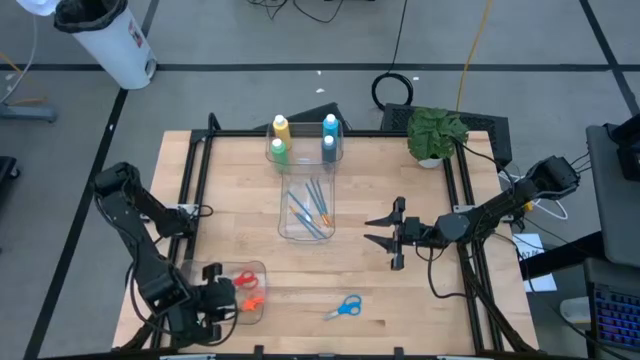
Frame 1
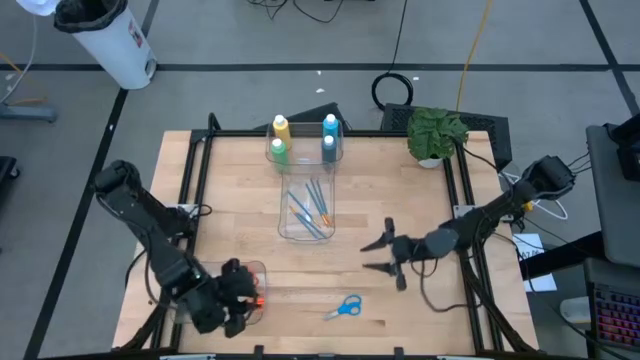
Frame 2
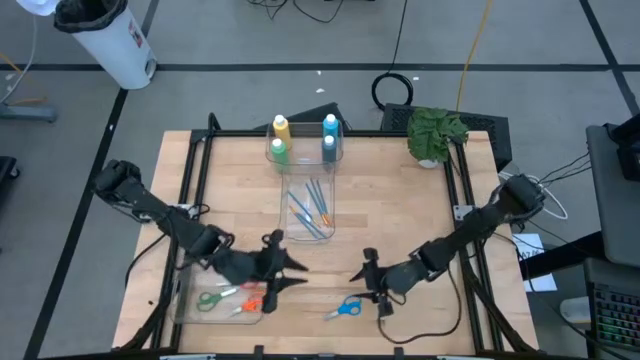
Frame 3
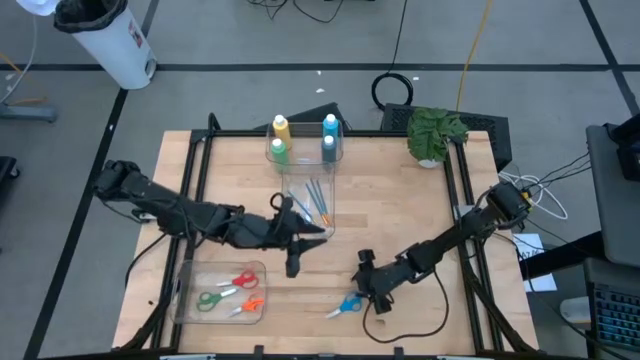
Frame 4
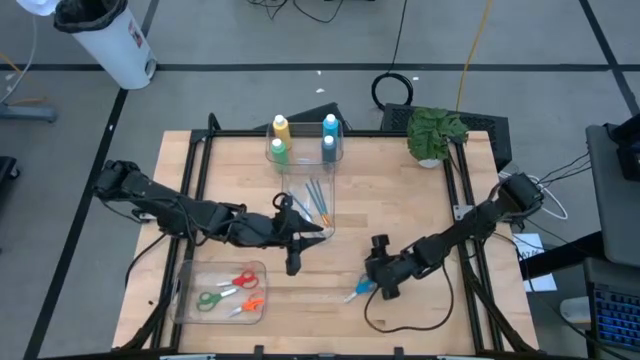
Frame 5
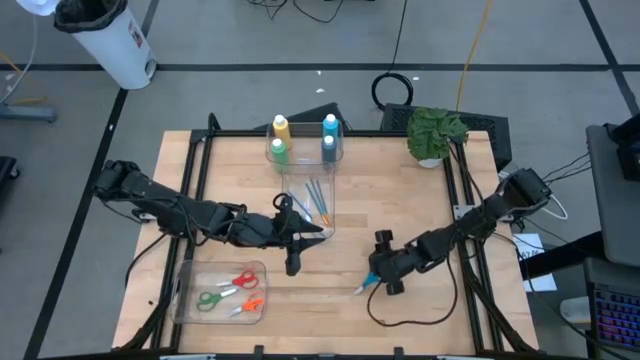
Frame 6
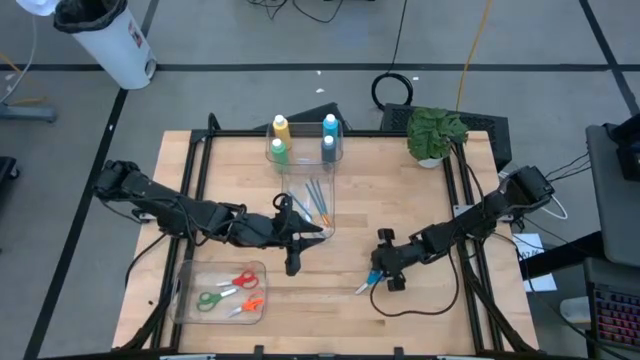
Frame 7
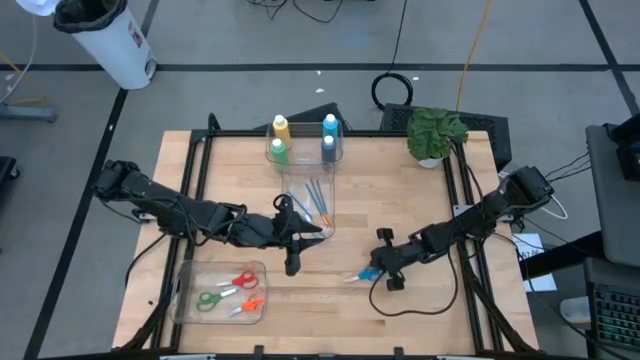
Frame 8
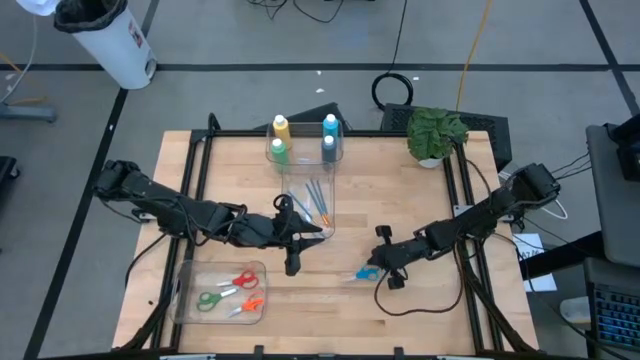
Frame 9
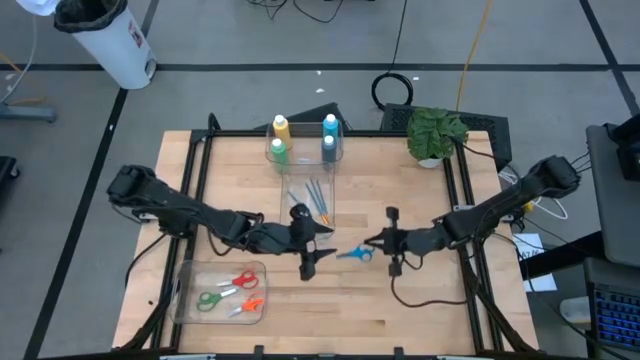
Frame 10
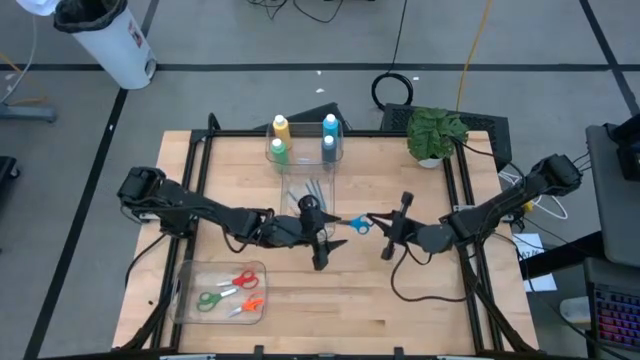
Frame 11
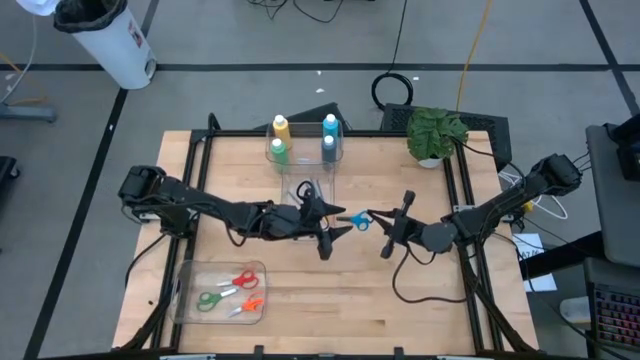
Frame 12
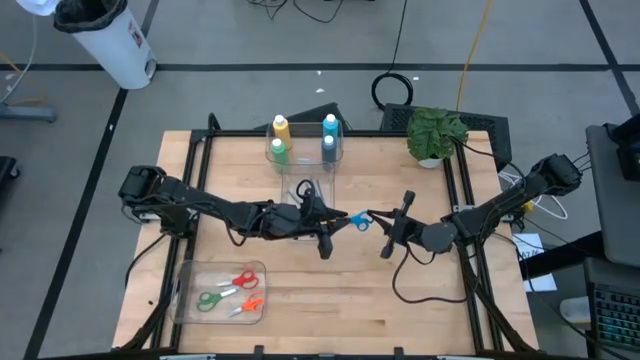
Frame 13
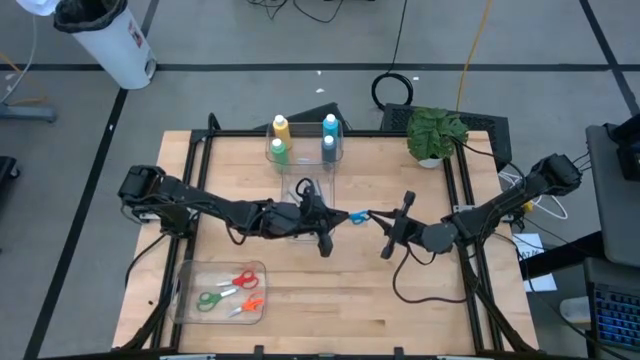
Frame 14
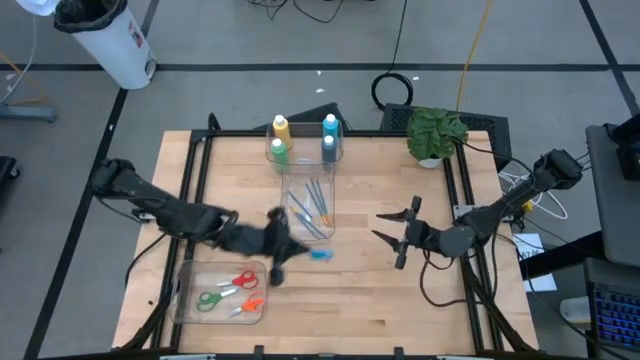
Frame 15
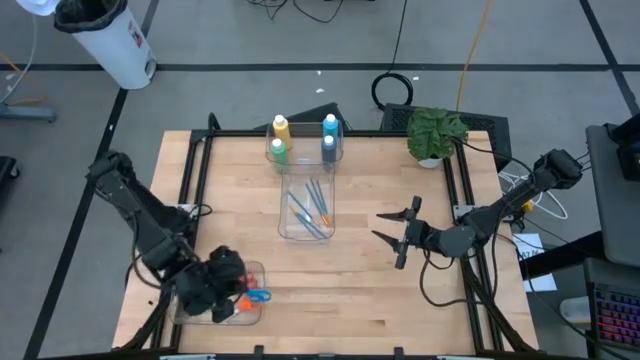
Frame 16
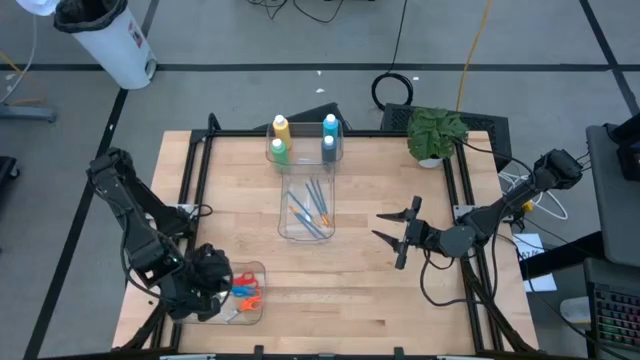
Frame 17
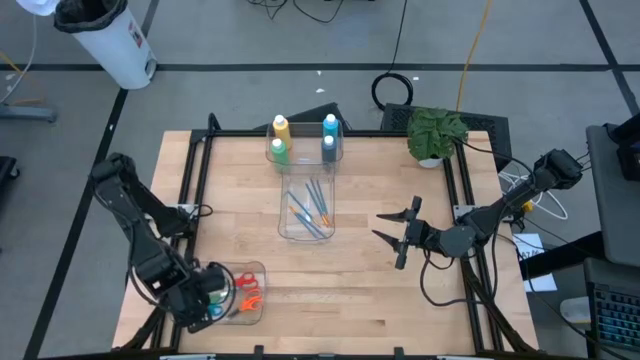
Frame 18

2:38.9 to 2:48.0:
Task: Pick & Place Paint Supplies
Put the blue scissors into the bottom transparent bin

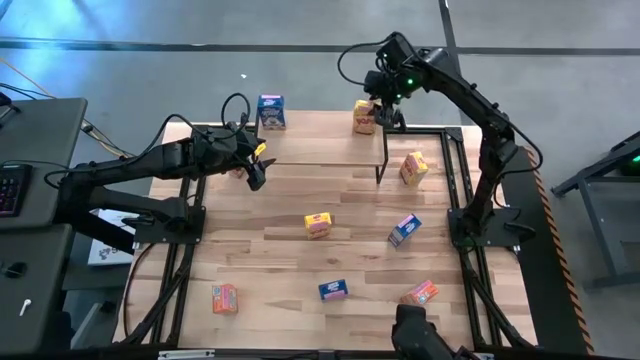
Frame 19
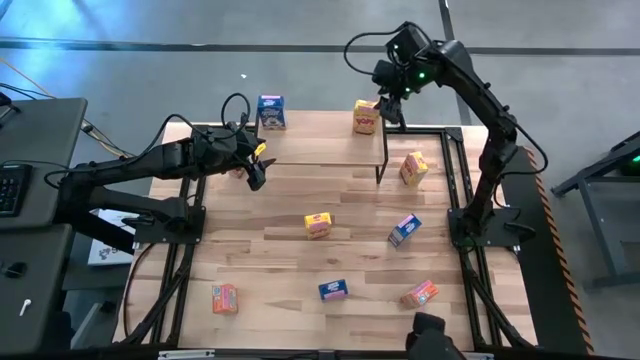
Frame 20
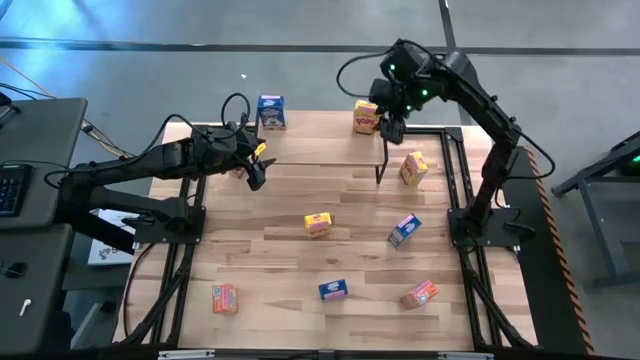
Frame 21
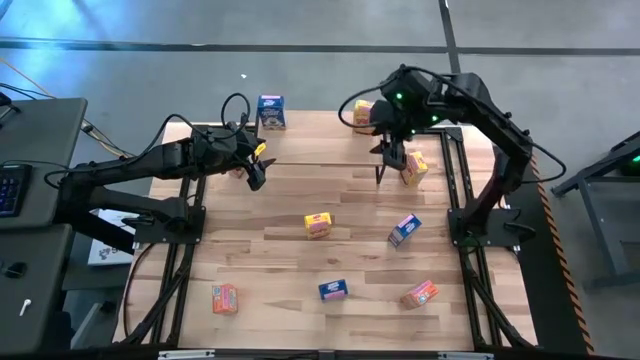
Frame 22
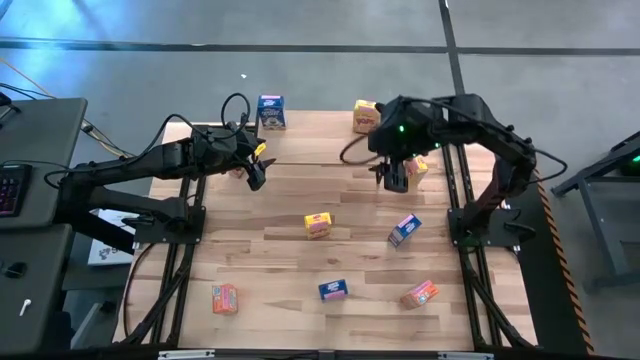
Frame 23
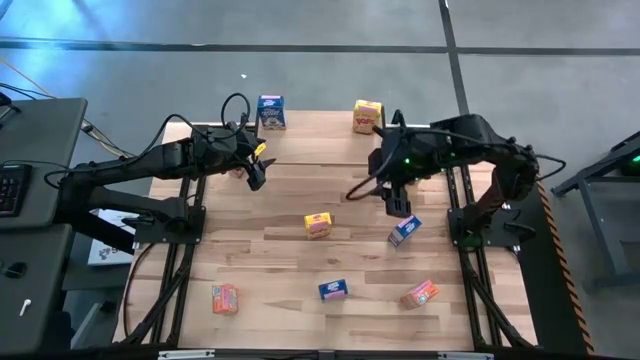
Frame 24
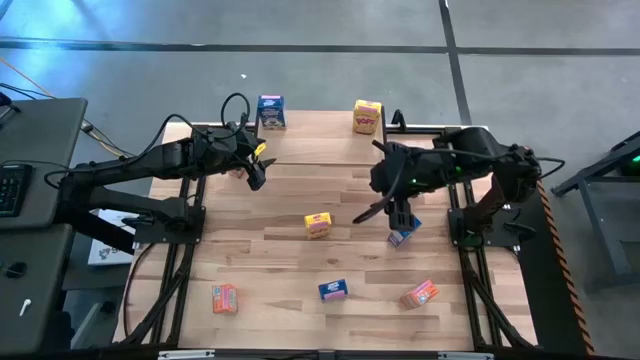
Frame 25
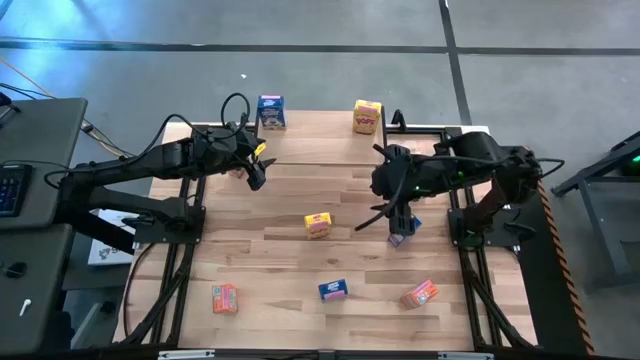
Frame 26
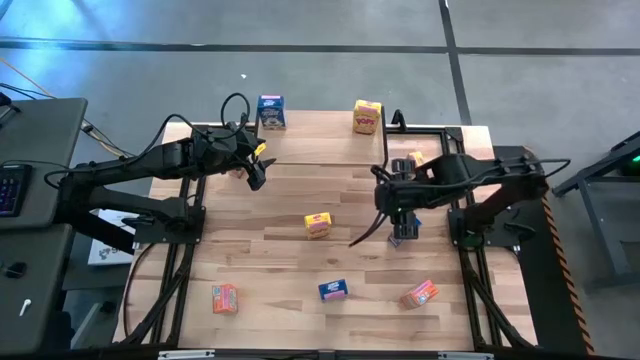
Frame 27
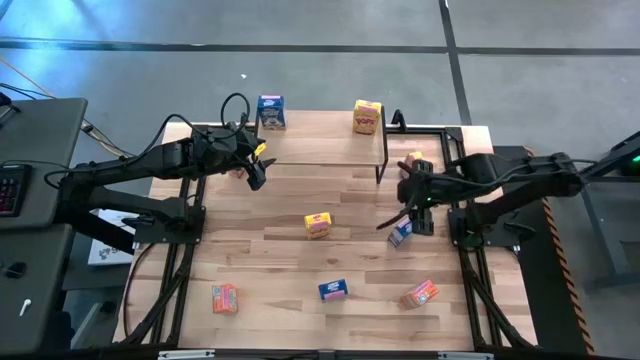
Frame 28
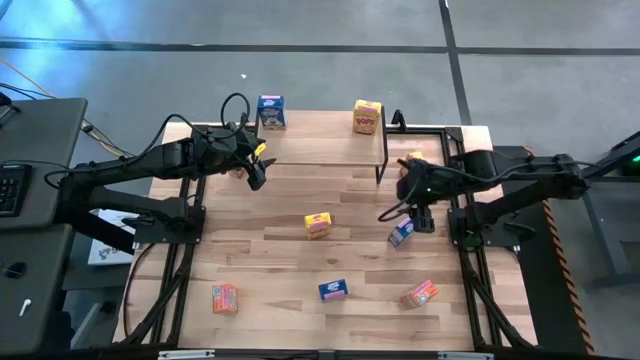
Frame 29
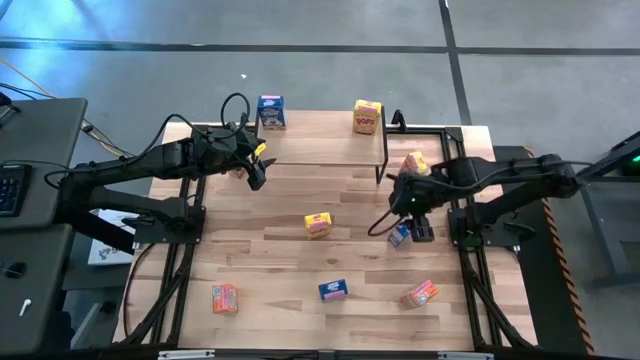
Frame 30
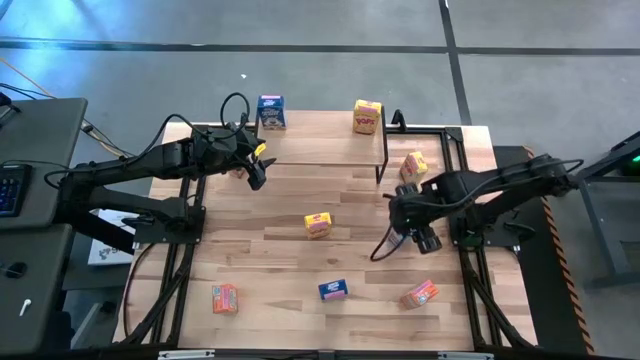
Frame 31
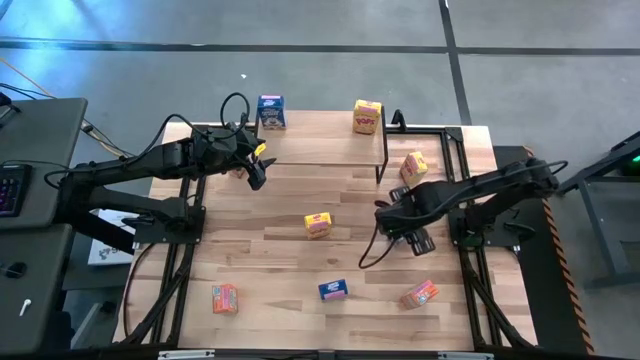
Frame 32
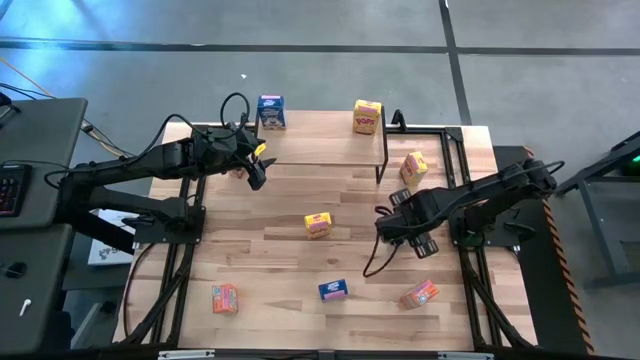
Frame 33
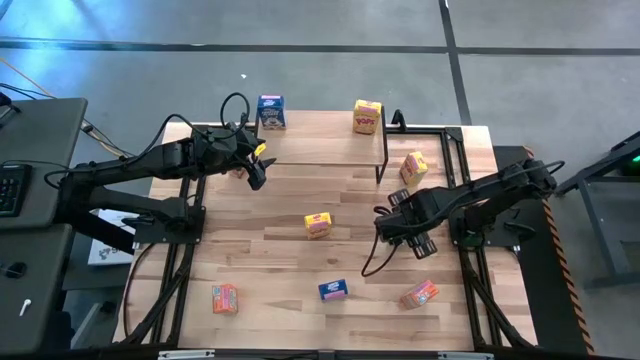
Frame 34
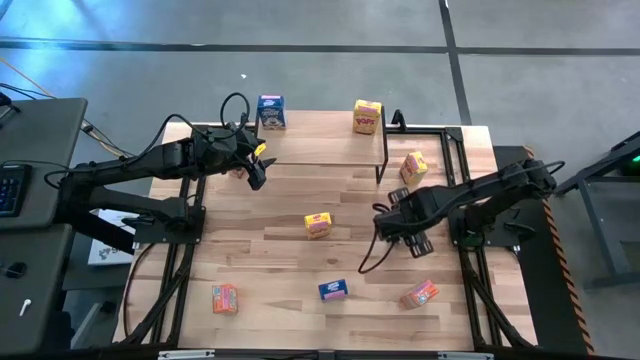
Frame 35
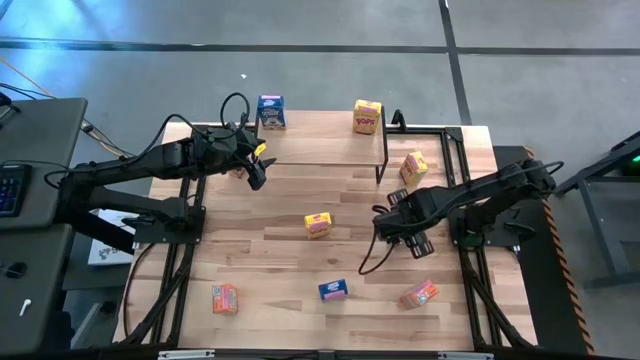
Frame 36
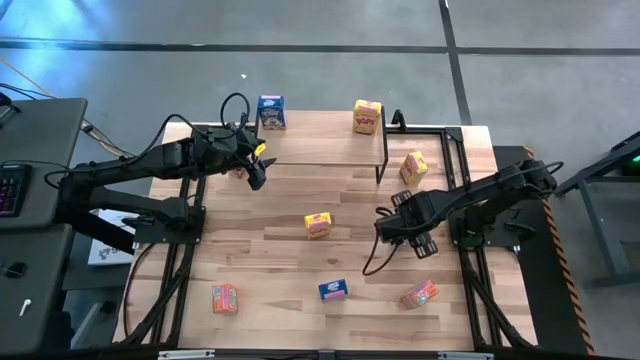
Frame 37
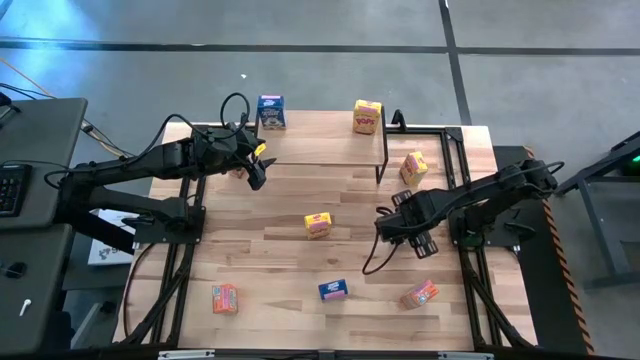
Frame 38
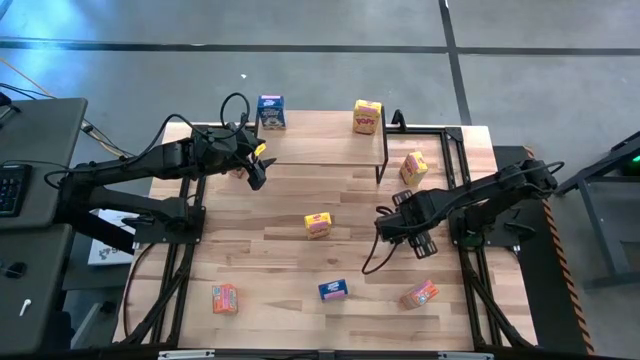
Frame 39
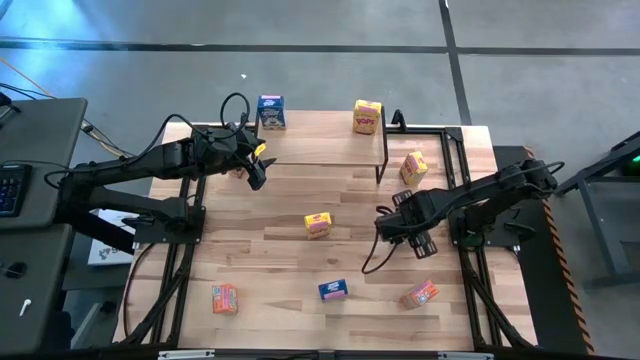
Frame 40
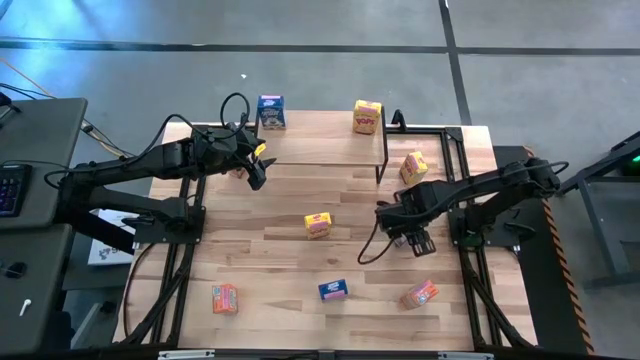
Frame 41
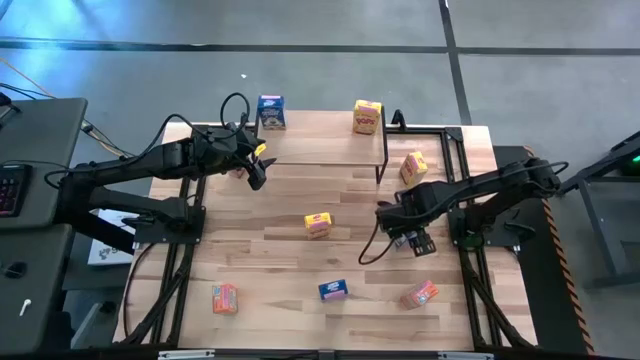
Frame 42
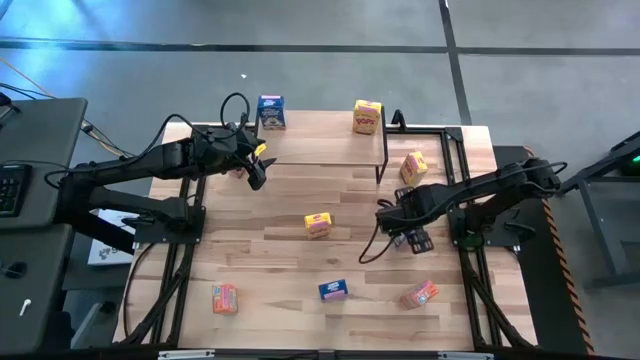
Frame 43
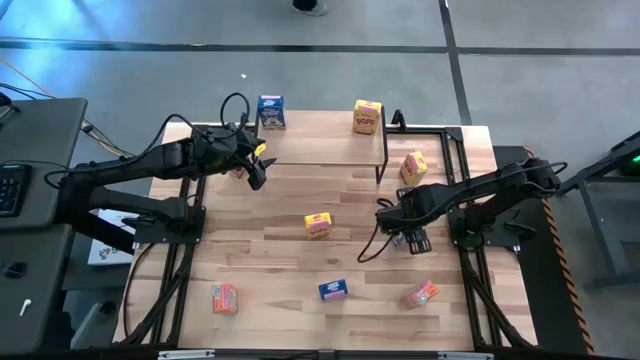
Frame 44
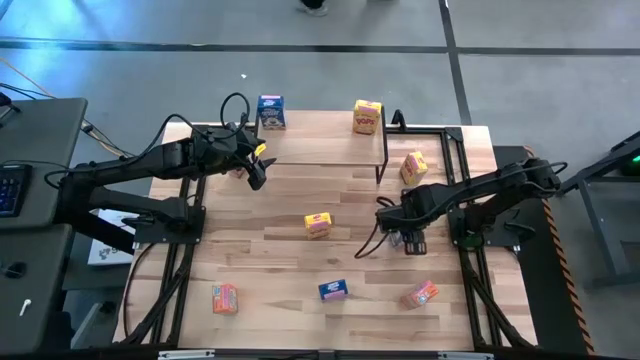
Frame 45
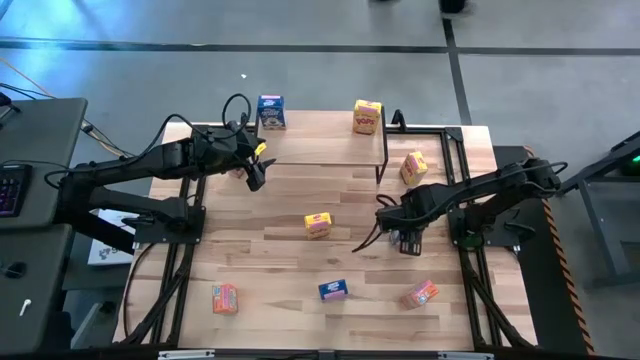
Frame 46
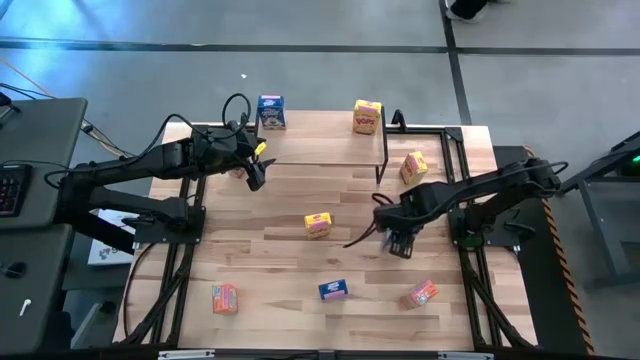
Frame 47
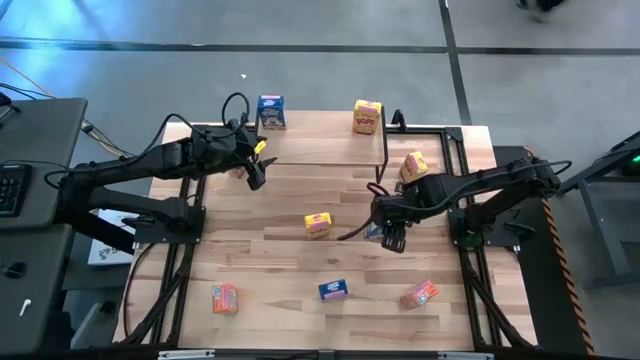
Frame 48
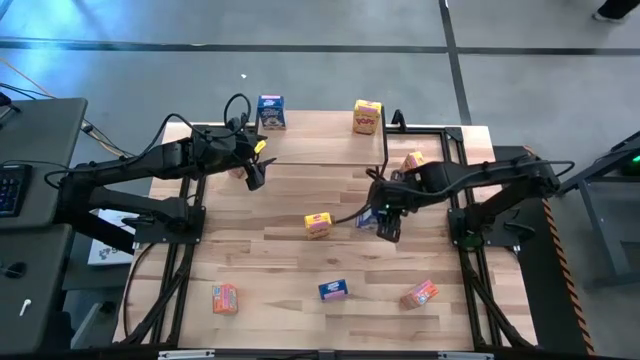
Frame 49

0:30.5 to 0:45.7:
Task: Stack cereal on shelf
Put the top blue cereal box on the shelf aligned with the other blue cereal box
